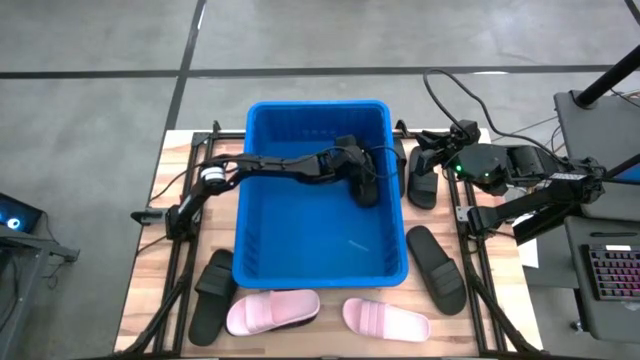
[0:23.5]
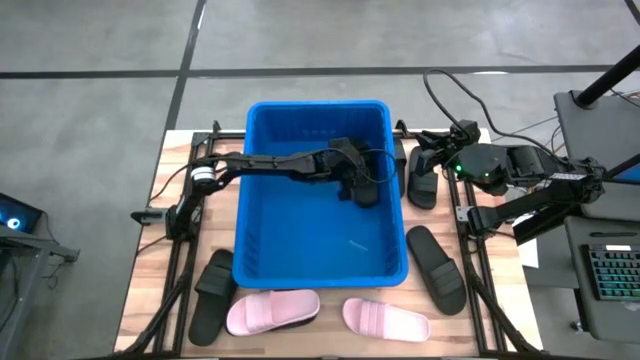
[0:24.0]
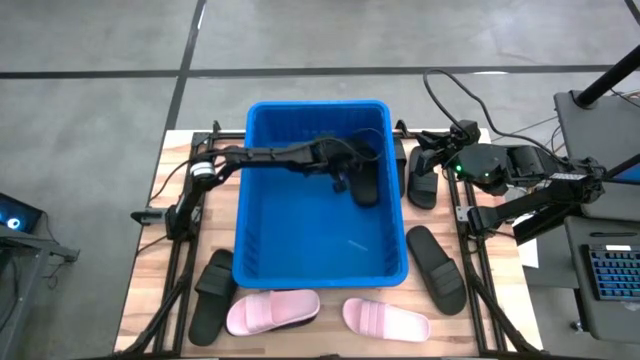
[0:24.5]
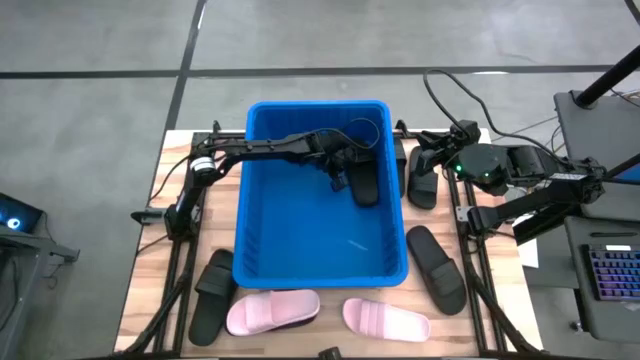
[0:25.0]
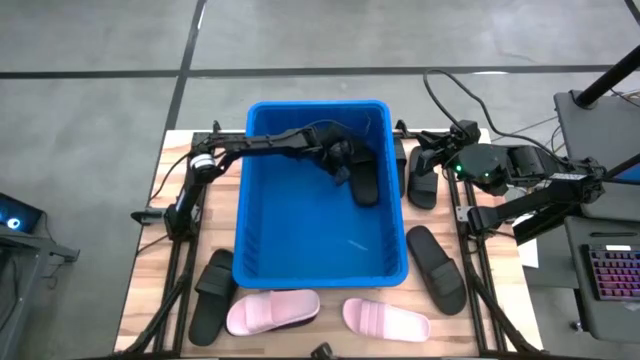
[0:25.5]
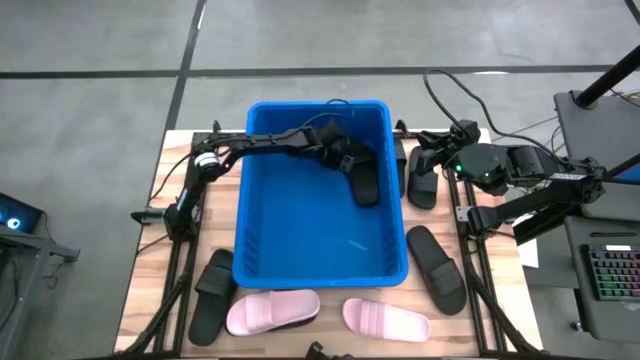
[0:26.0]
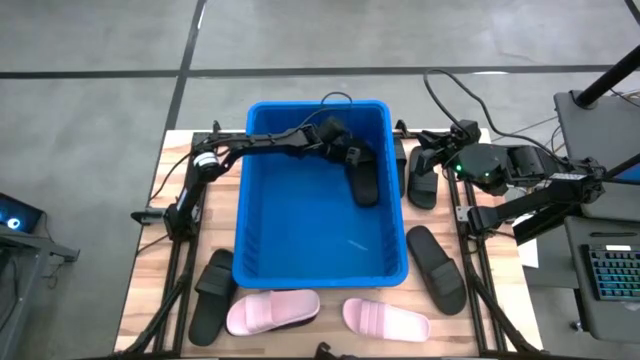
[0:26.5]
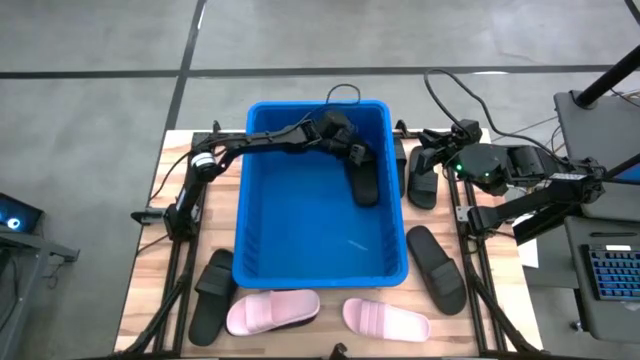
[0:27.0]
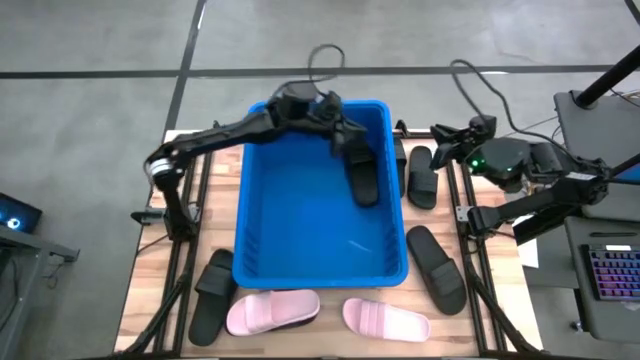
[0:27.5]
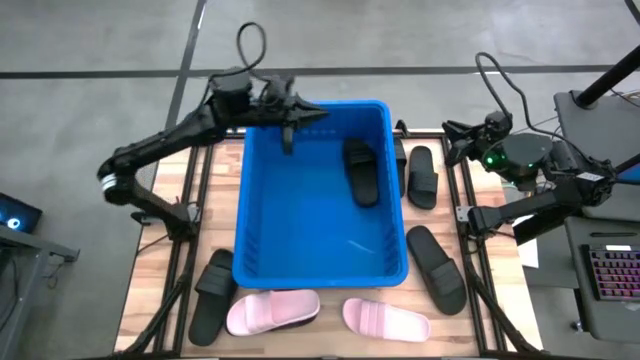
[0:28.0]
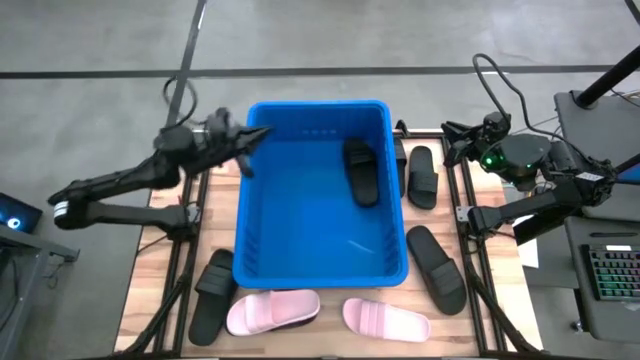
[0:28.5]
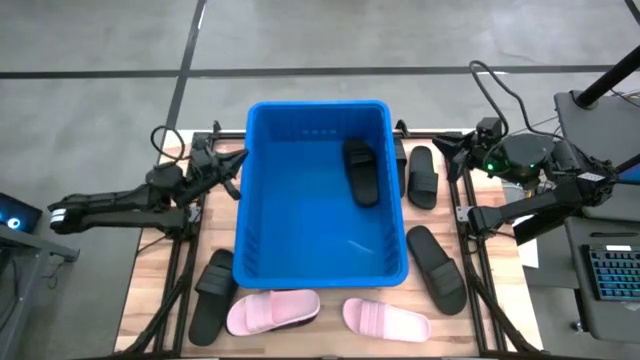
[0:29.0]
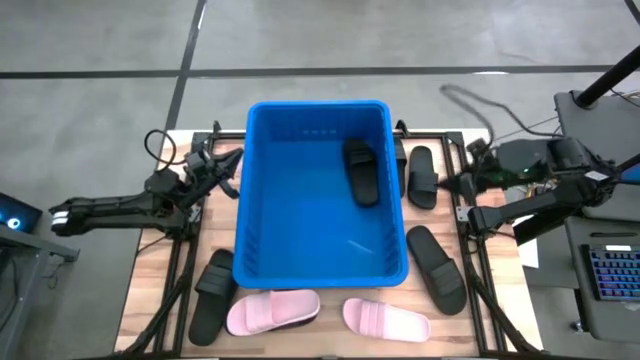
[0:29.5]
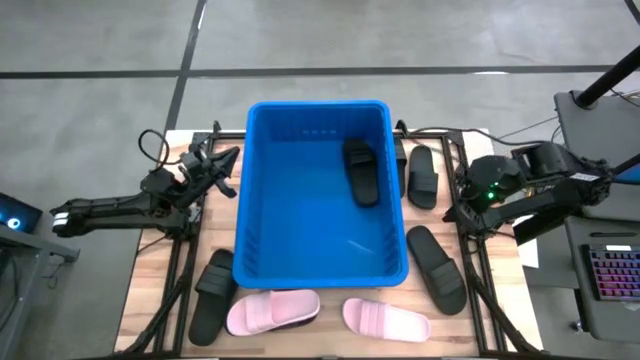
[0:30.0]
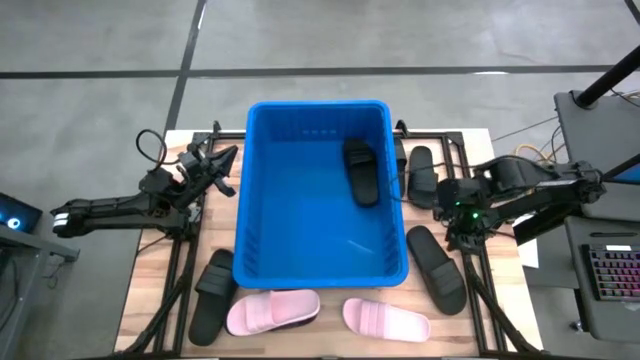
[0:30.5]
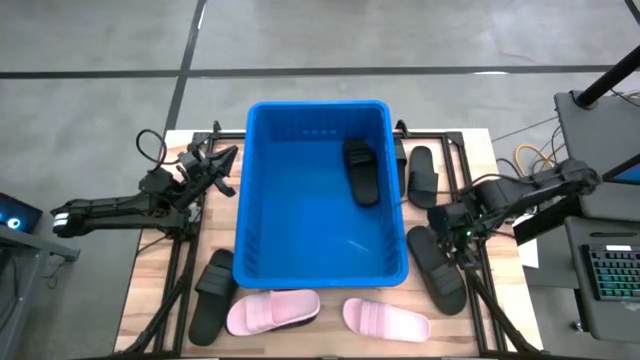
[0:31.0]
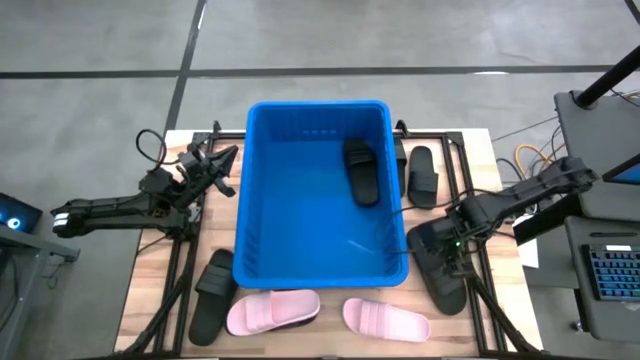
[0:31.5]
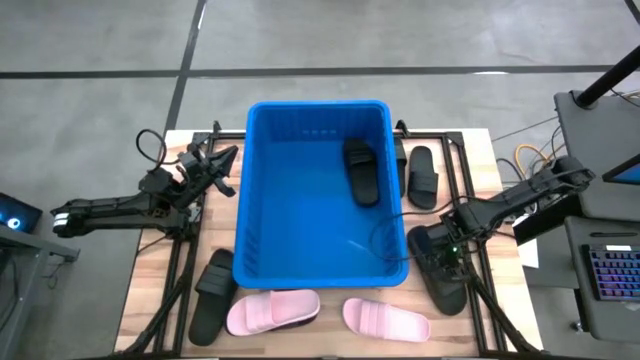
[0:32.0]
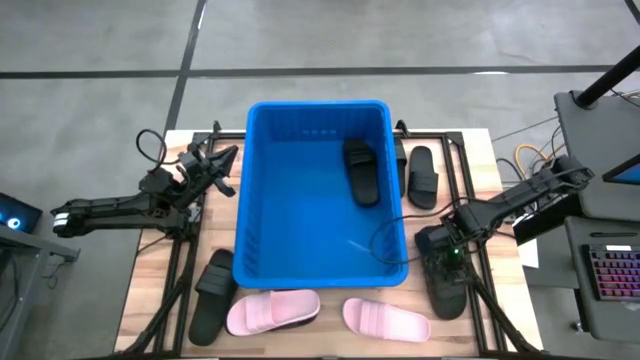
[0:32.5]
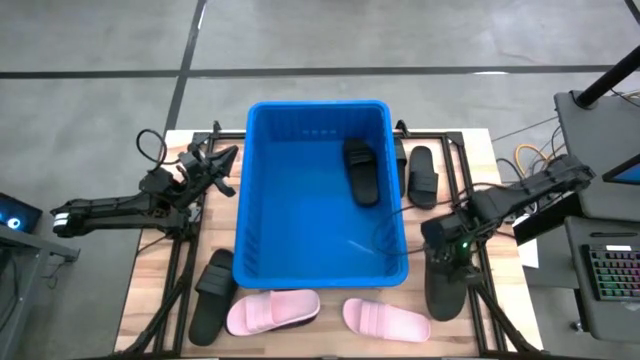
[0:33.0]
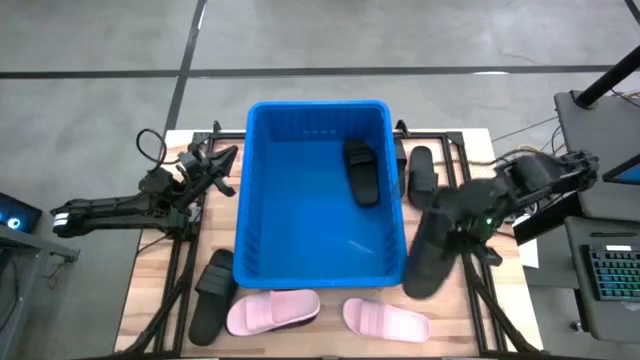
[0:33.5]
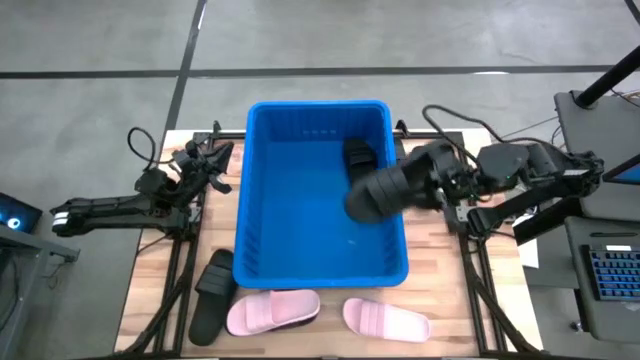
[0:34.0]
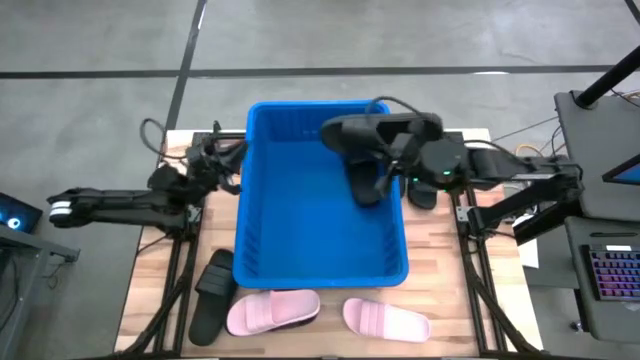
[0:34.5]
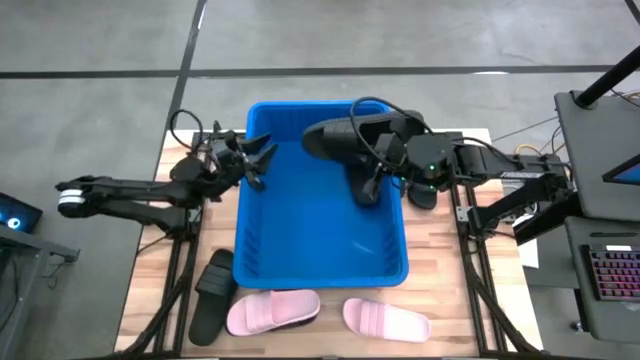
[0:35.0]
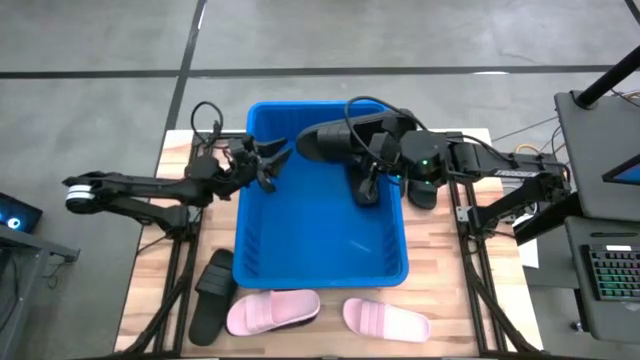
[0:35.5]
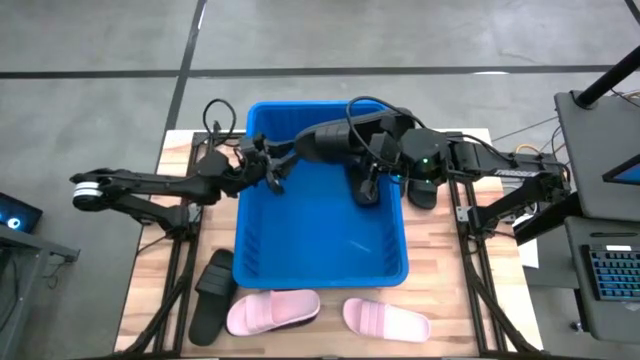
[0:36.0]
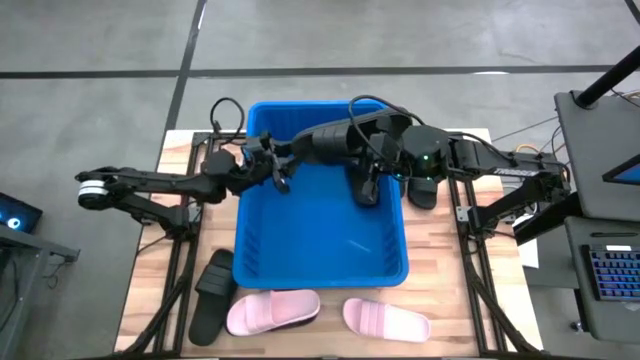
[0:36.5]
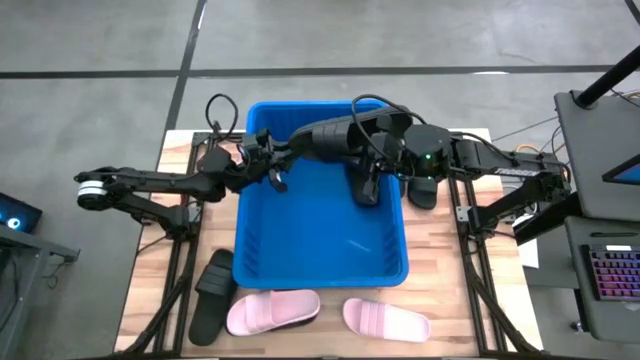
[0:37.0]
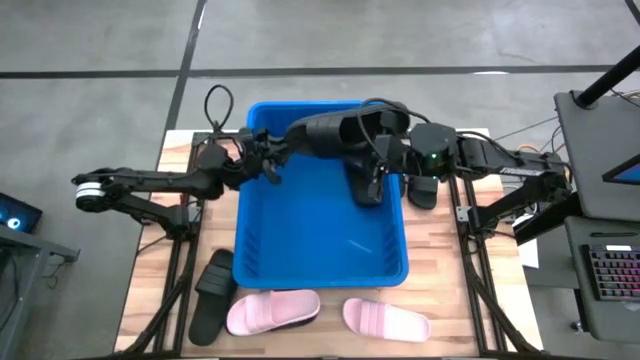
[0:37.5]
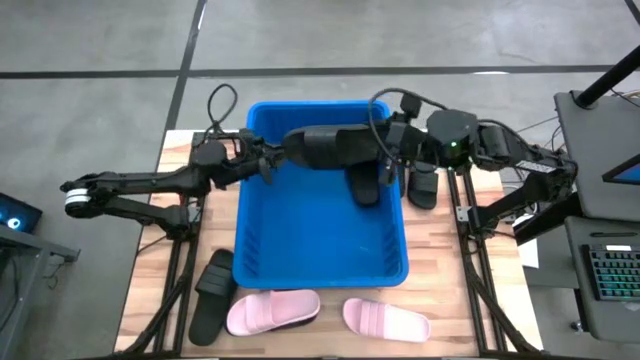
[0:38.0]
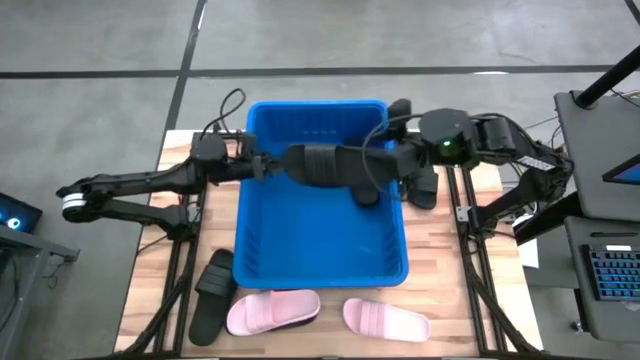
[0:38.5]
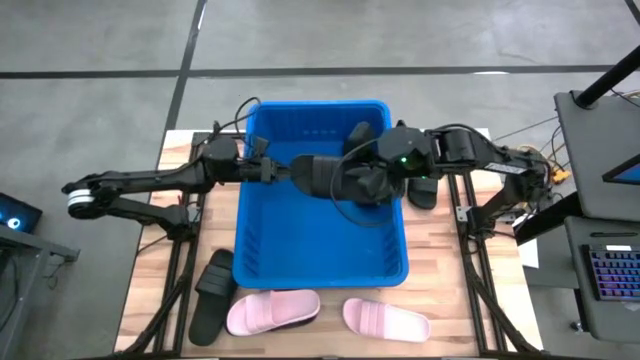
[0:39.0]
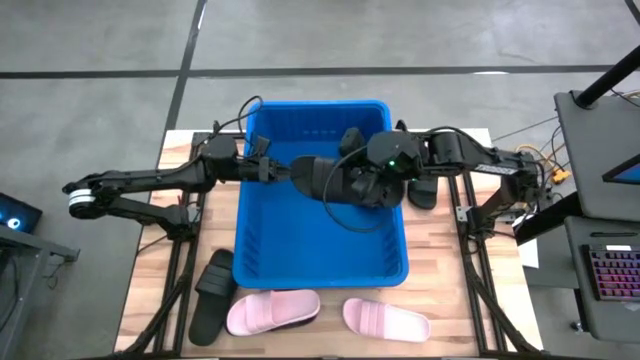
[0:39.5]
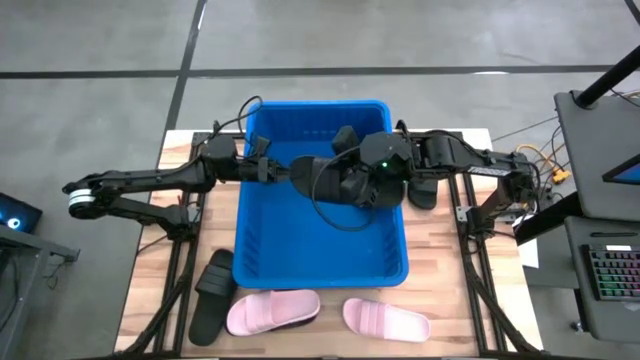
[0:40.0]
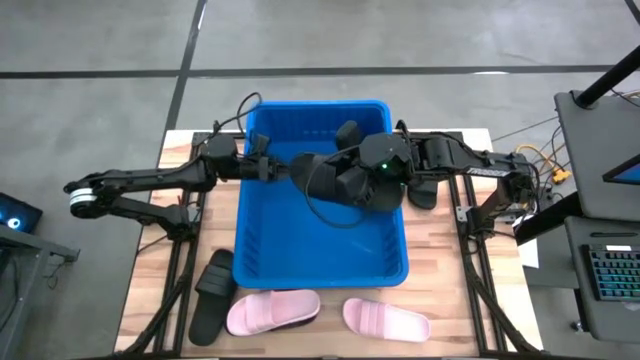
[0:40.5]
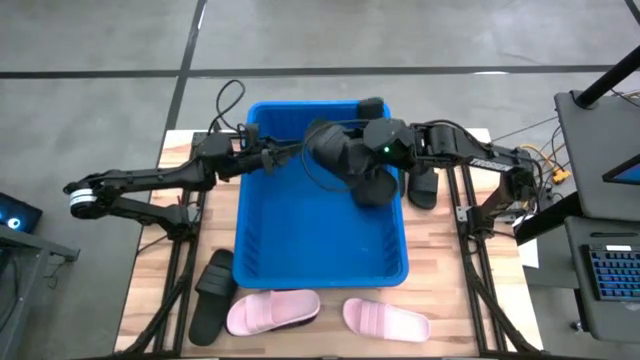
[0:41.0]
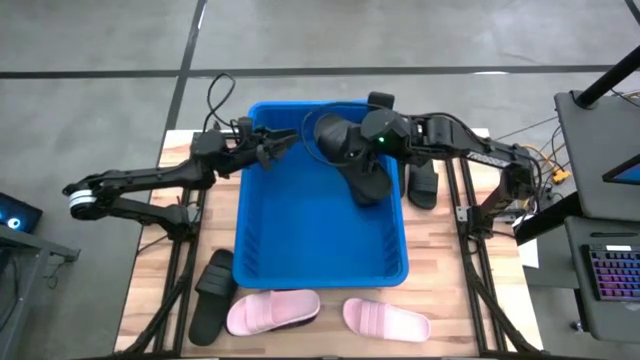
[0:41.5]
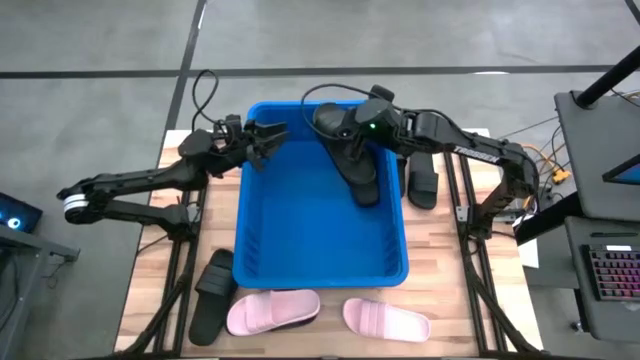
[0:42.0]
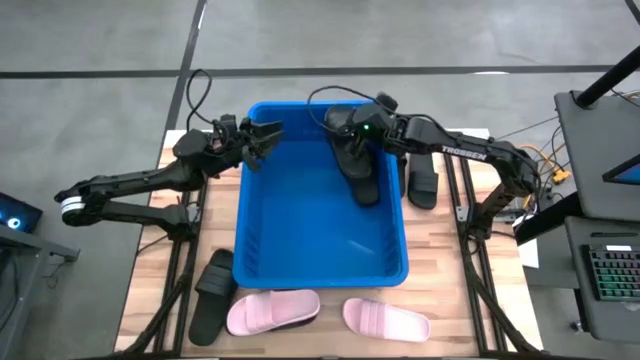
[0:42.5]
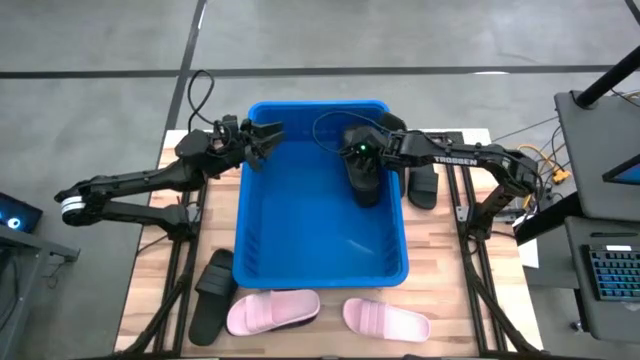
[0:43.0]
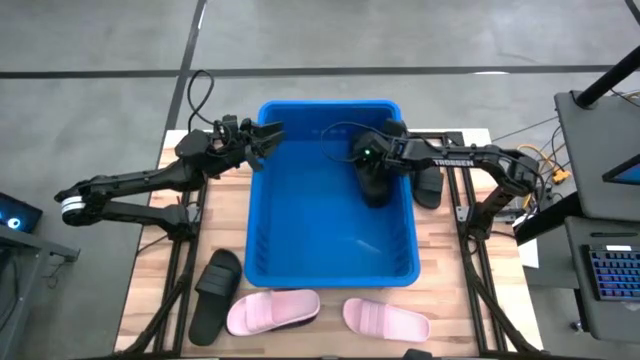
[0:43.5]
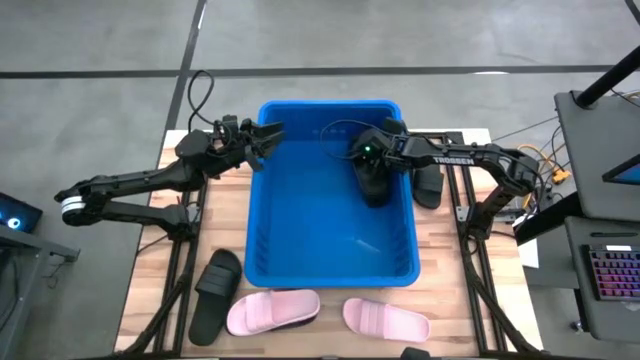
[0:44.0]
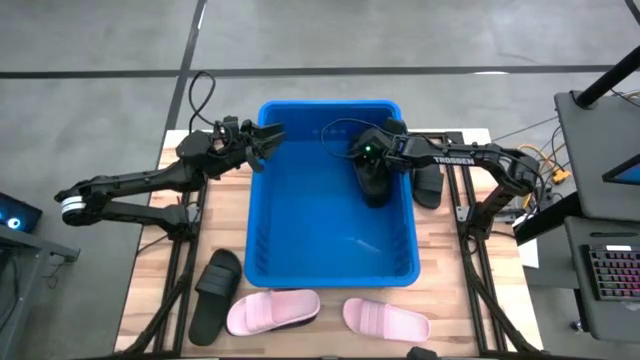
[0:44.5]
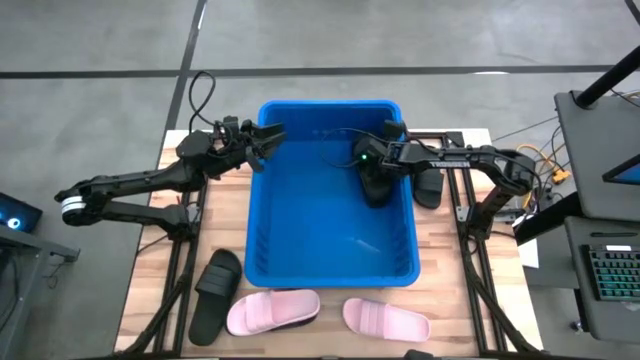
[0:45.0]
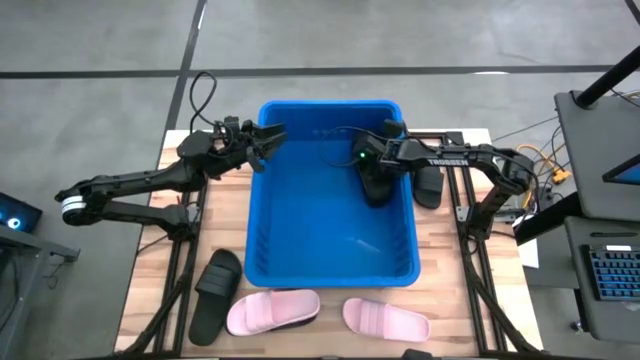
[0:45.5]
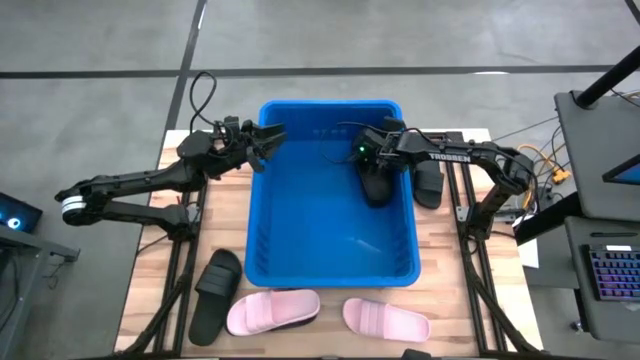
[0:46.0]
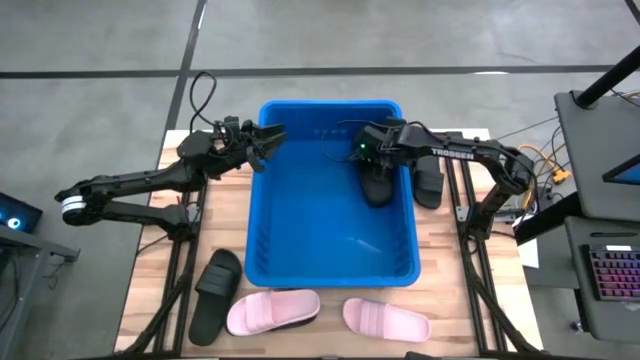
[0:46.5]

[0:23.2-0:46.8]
Task: Pick and place slides into bin
Put the black slides into the blue organizer bin
